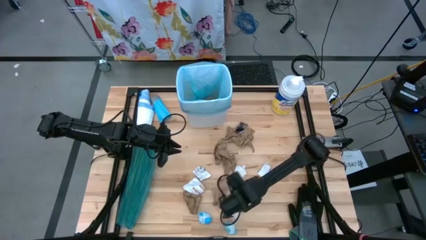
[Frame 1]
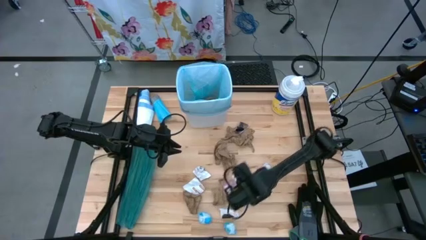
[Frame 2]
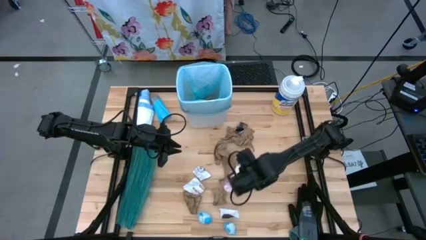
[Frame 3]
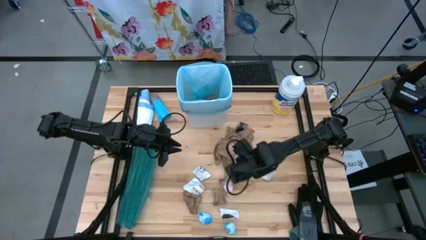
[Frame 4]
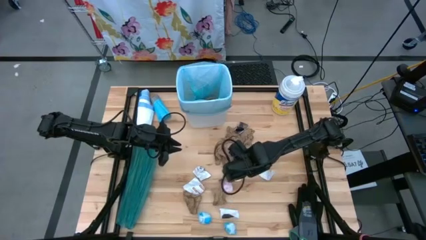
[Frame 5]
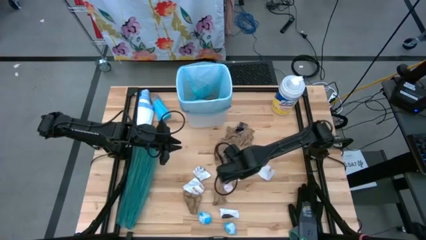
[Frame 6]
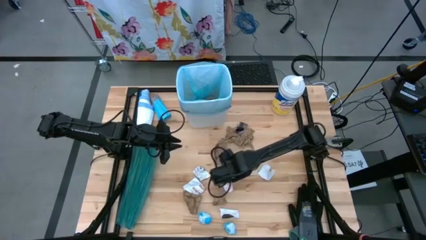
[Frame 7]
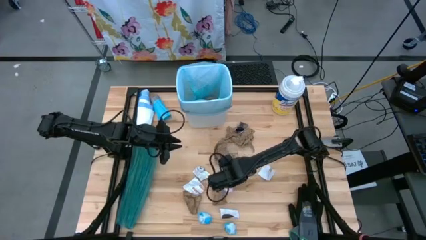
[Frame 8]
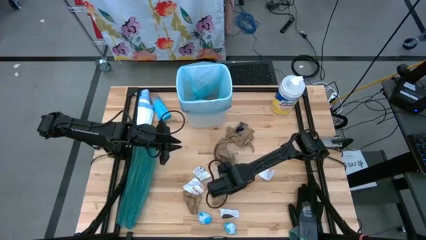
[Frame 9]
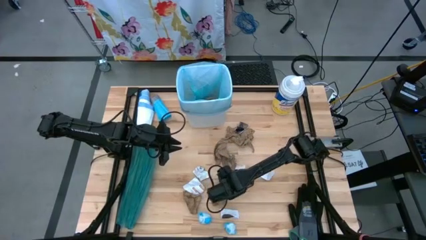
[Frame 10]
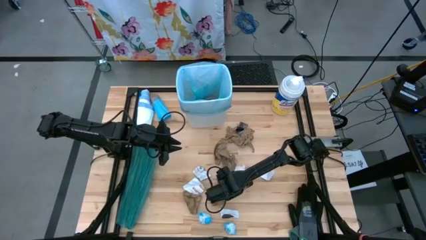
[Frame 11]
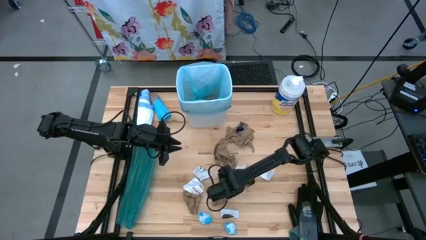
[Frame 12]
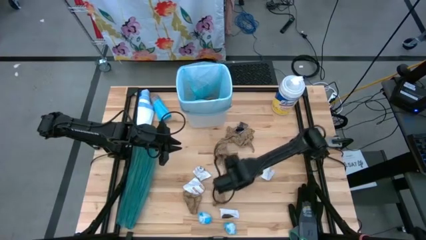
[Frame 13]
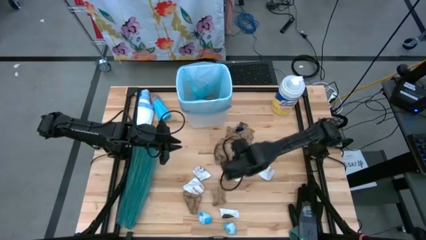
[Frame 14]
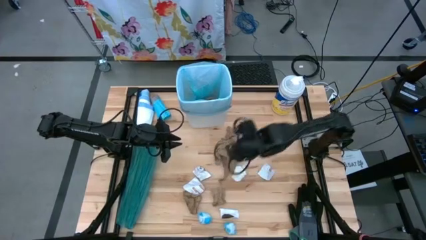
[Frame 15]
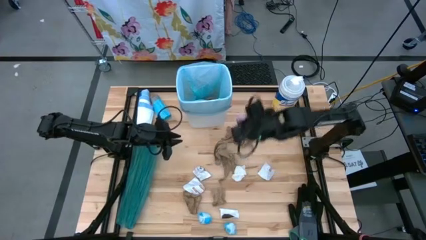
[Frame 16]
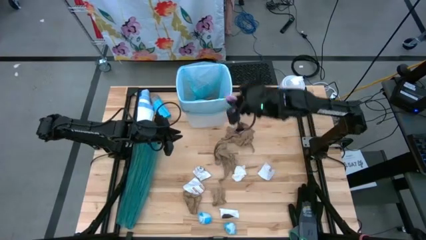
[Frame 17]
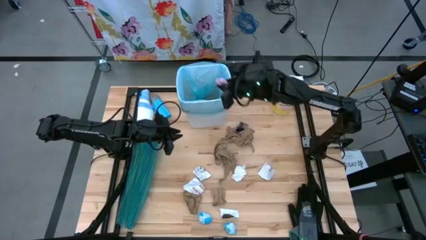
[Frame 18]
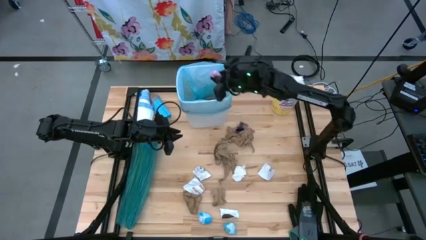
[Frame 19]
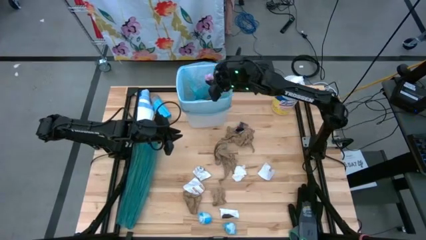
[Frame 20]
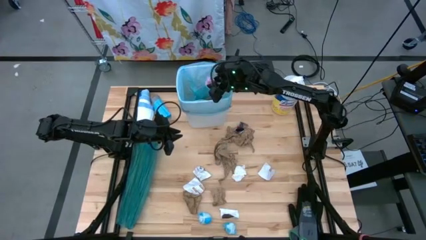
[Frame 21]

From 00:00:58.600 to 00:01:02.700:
Task: place trash/remove bag and relplace
Put the pink plastic into the white trash bin

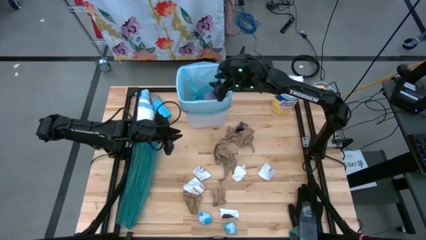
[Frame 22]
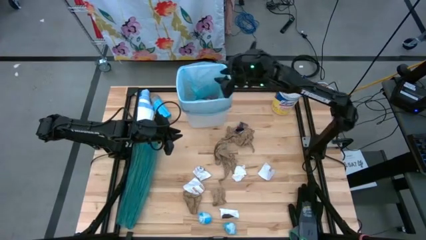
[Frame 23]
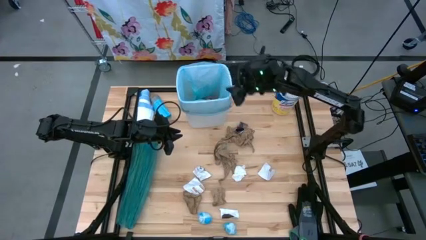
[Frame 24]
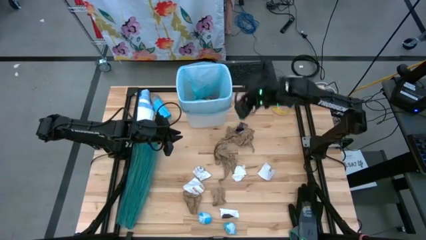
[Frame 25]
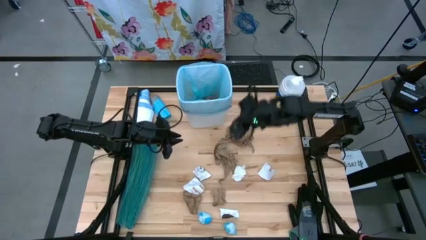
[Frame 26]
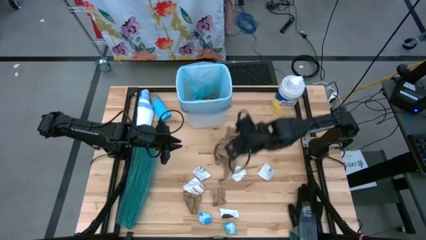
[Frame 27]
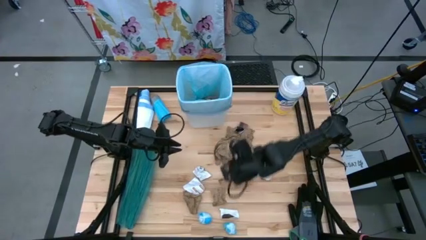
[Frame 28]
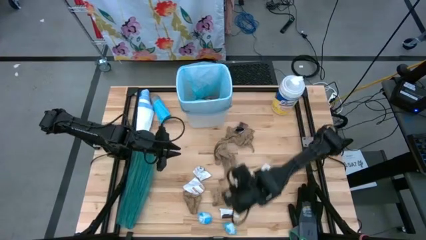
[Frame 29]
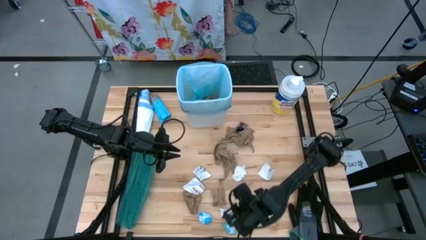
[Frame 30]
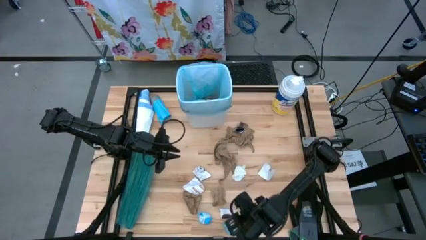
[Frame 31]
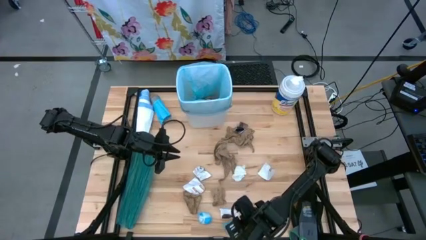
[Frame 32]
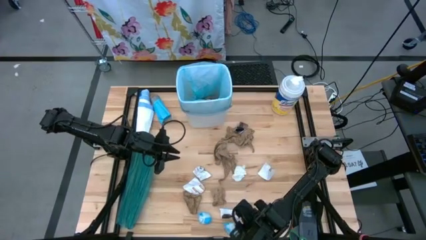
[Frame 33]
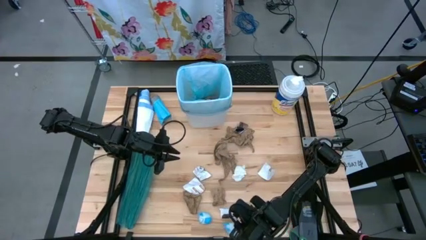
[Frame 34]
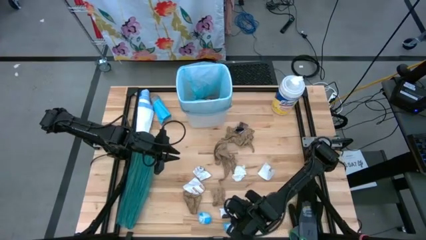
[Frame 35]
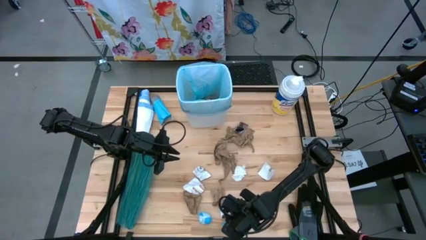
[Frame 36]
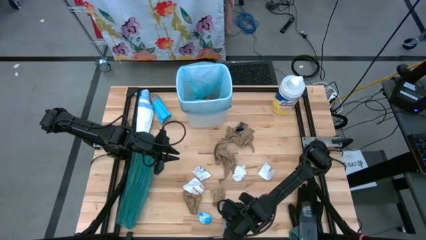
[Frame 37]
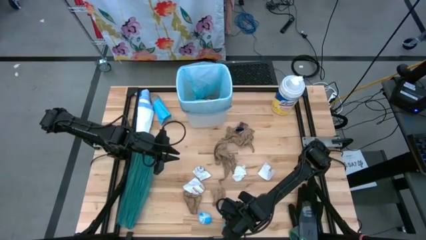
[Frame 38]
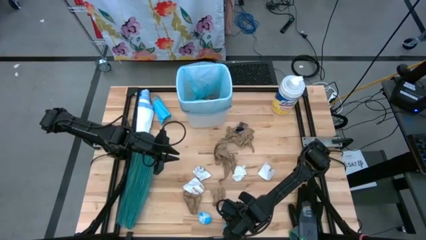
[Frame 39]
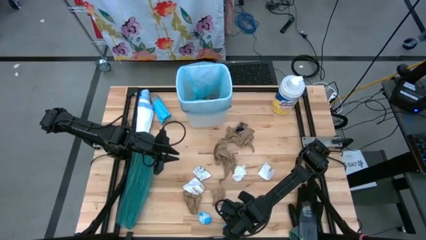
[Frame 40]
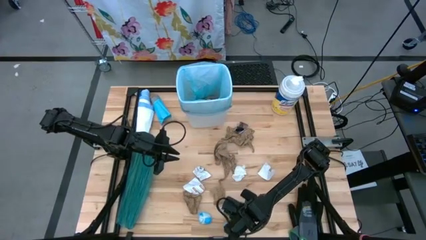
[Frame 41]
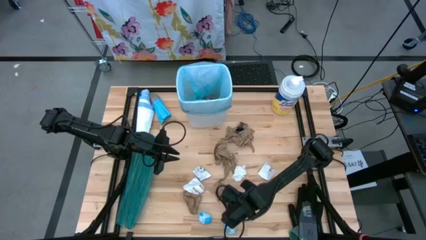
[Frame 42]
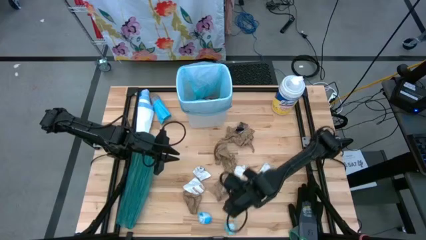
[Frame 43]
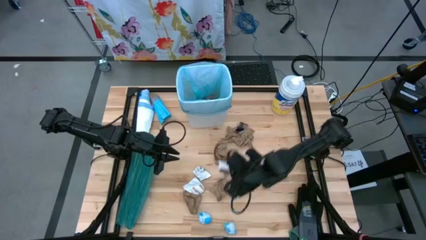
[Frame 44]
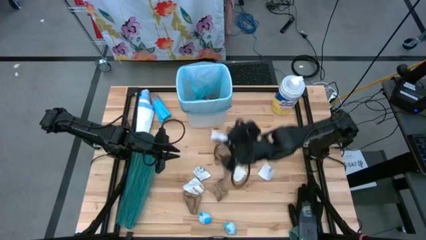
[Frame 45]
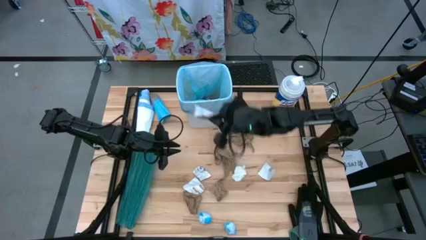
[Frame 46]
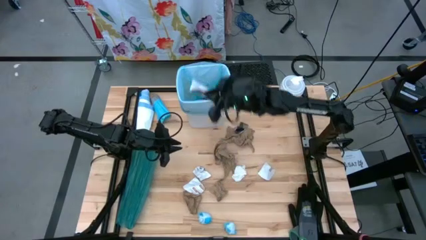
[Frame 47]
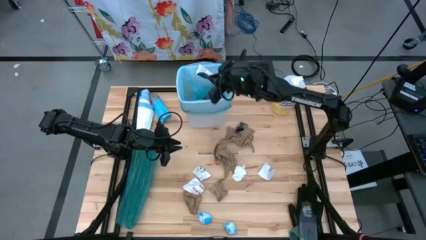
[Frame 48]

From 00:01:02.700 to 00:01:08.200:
Put the white paper into the white trash bin

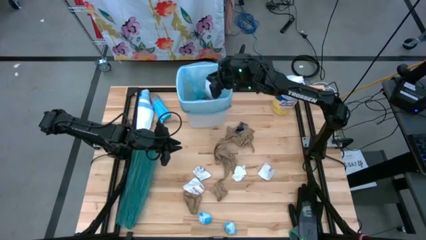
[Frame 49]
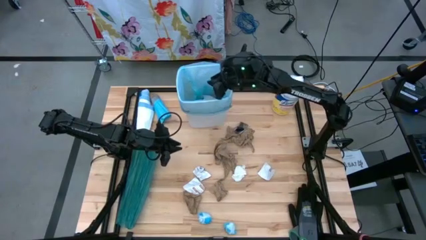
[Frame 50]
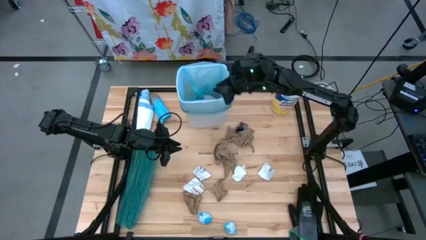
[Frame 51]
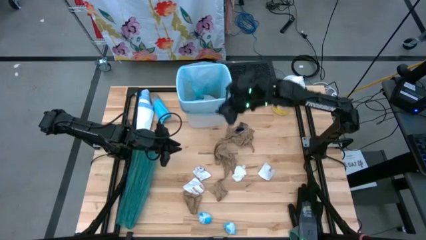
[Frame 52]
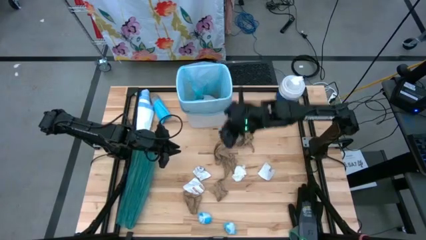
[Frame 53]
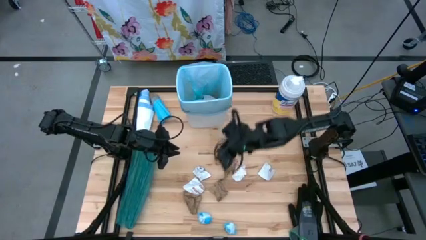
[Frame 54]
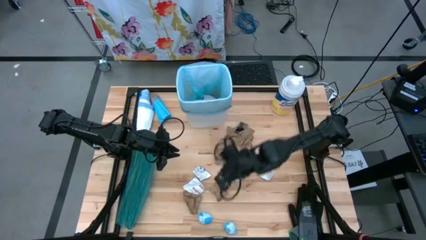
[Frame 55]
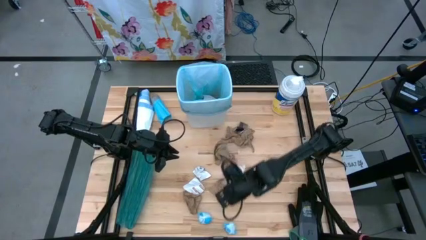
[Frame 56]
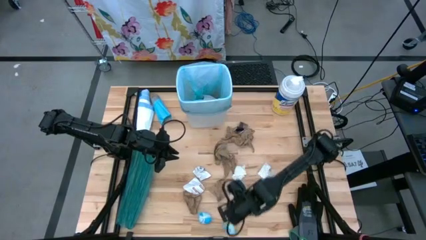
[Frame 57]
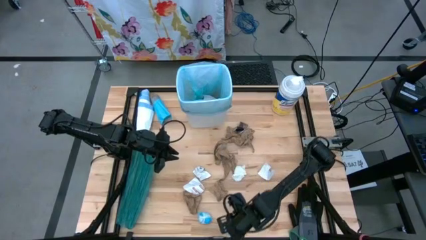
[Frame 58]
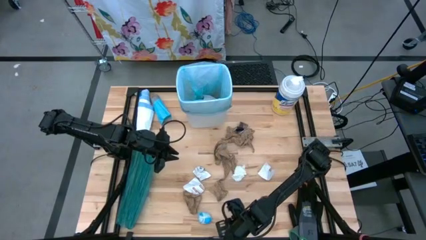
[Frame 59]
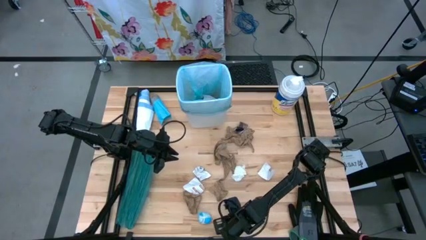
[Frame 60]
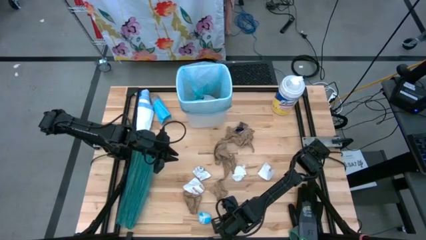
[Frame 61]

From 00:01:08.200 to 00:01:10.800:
Put the blue plastic into the white trash bin

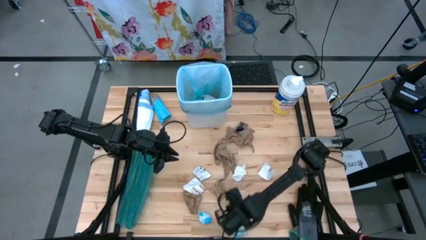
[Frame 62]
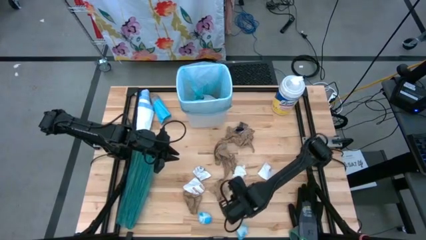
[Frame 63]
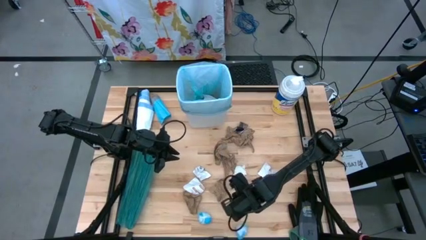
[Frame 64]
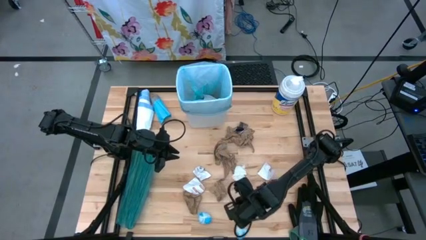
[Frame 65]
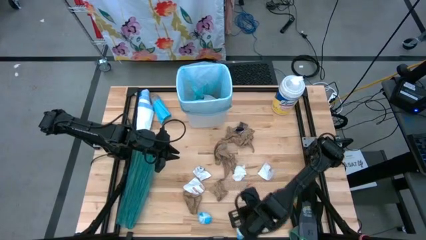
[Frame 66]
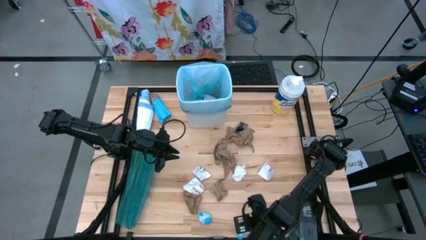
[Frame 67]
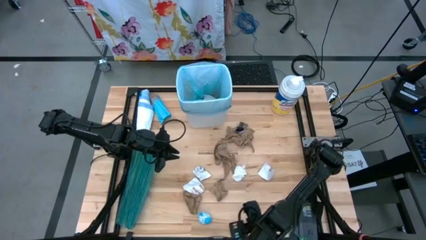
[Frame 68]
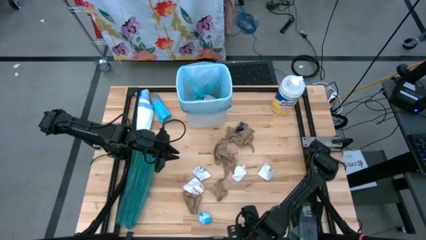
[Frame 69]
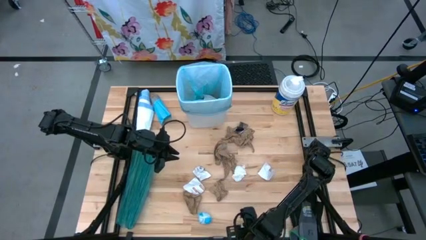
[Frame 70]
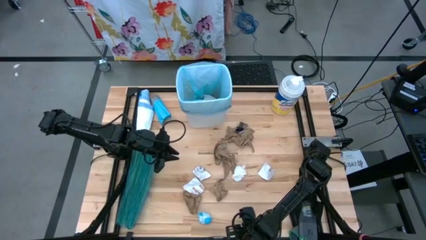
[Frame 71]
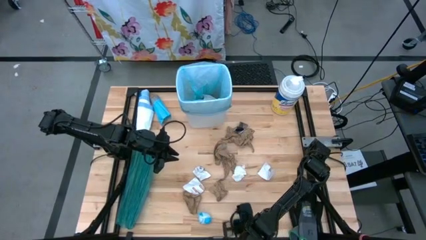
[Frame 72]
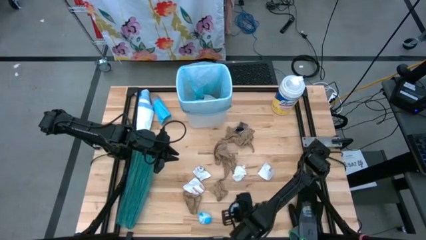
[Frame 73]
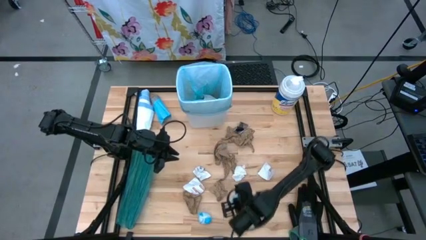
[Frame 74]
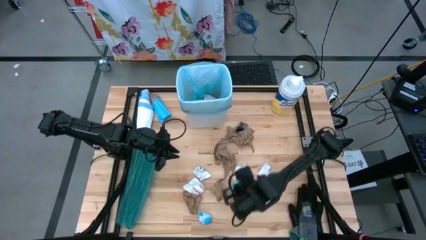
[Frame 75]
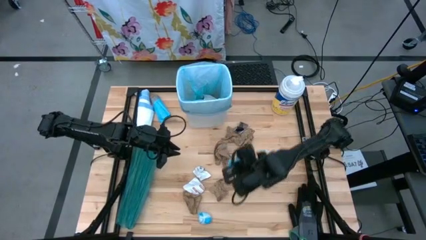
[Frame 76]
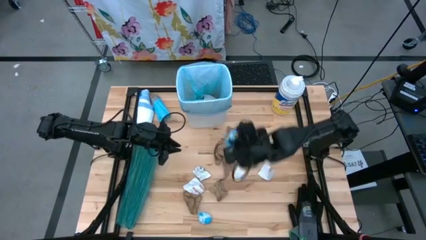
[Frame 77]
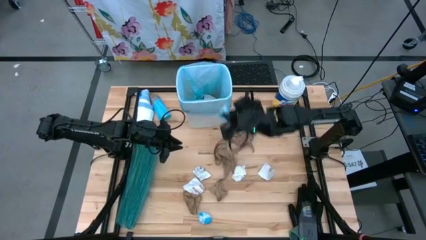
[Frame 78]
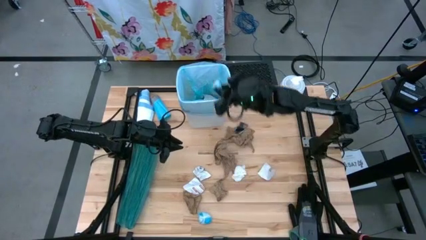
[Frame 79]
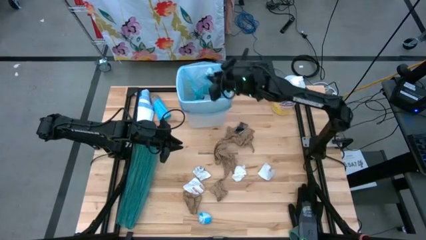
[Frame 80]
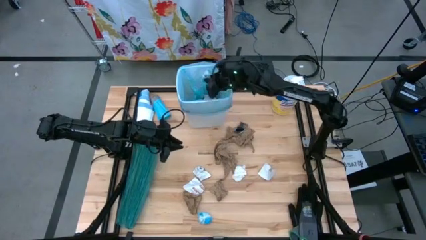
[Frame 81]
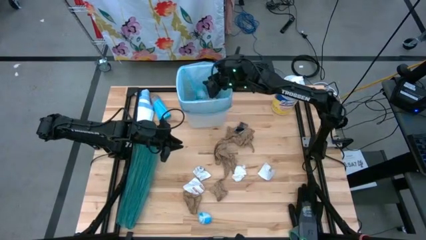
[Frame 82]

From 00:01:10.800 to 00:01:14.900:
Put the blue plastic into the white trash bin
